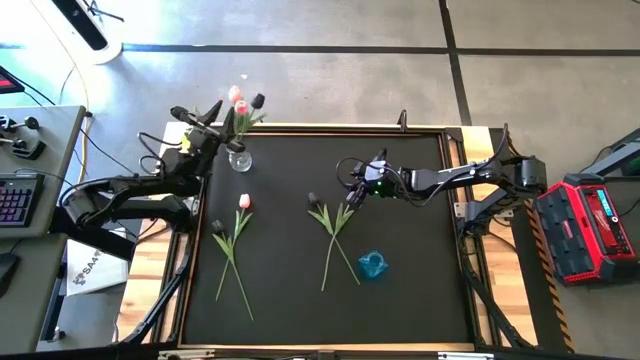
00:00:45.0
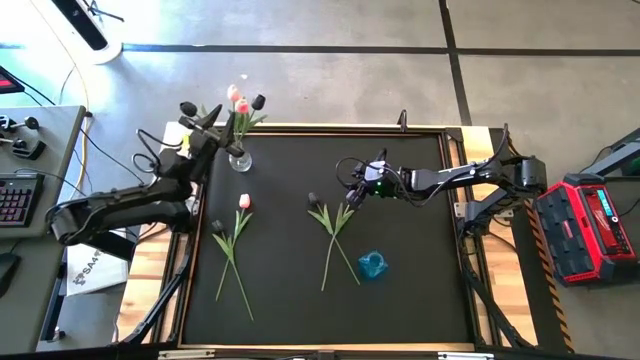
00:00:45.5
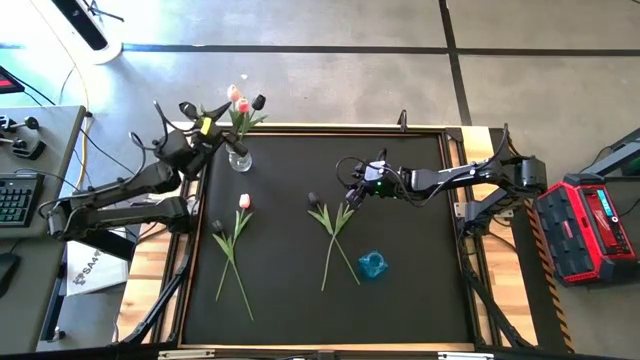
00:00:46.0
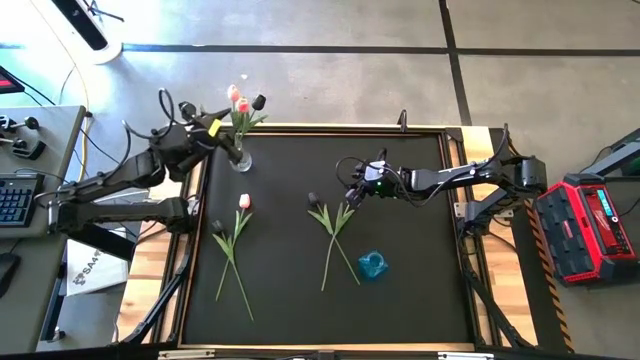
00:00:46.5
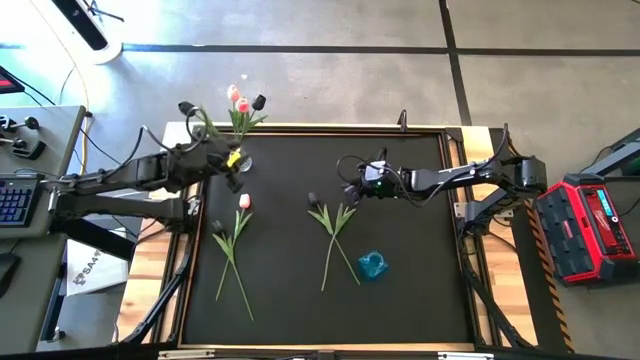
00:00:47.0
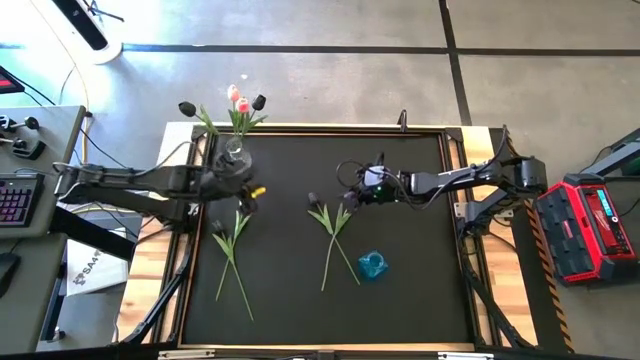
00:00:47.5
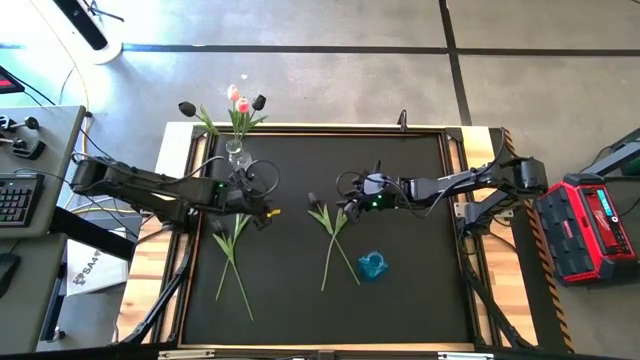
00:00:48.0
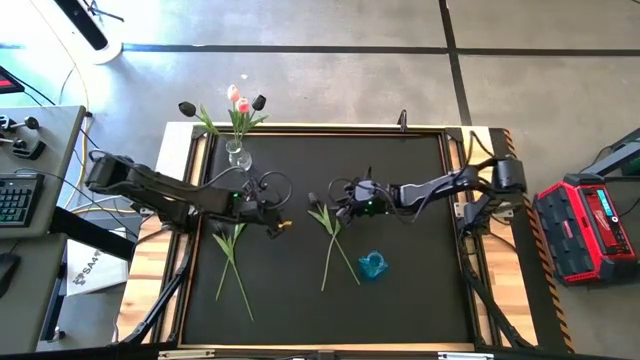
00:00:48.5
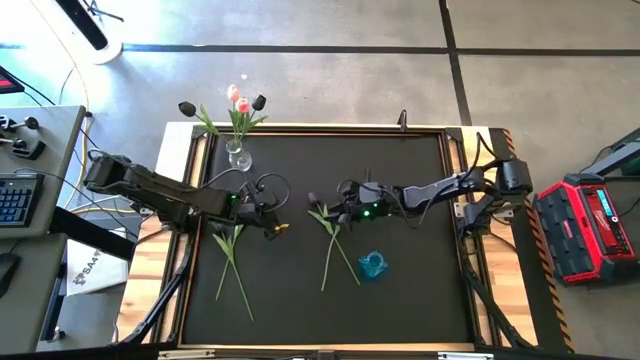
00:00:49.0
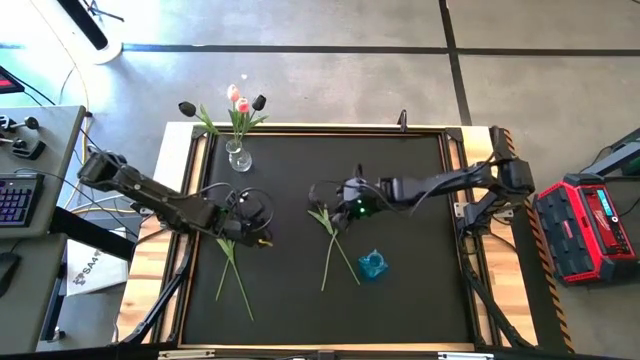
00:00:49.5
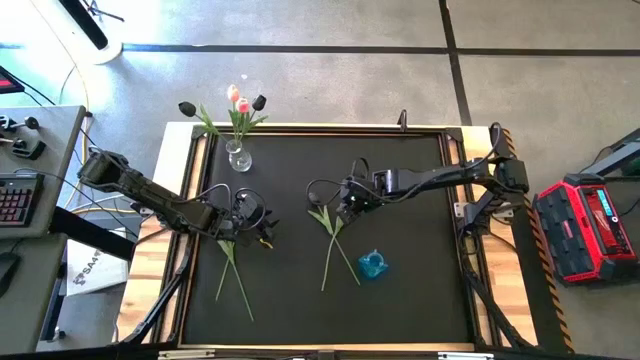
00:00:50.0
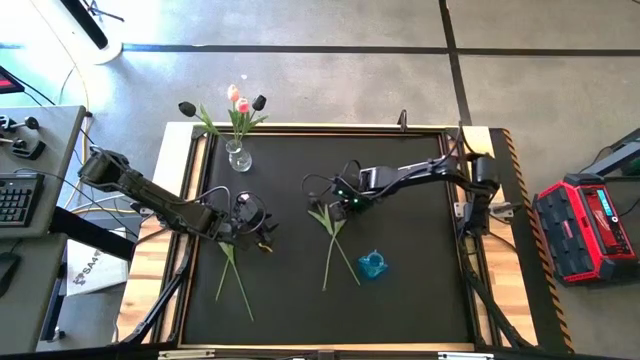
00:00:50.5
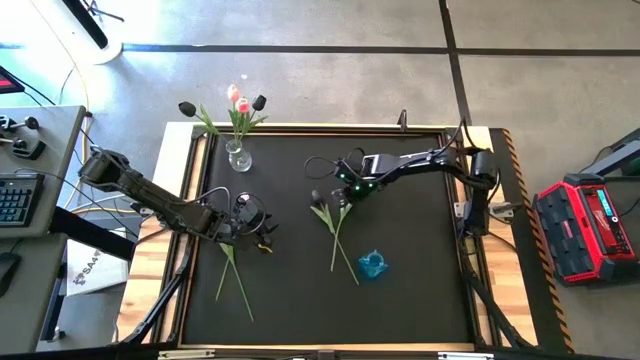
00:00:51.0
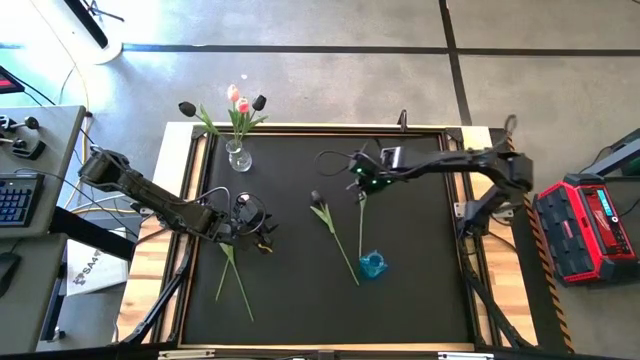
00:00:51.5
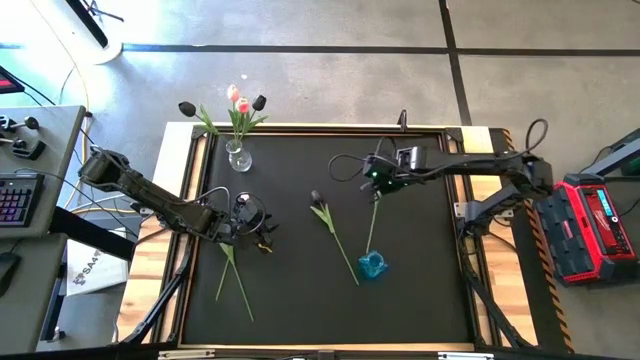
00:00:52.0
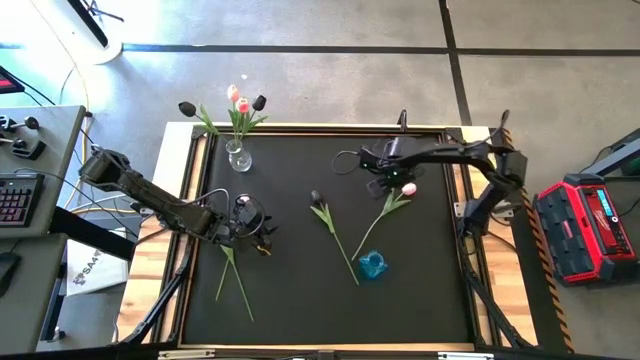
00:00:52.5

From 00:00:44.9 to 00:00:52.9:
Task: Sort flowers into vase by color
Put the right pink flower into the blue vase

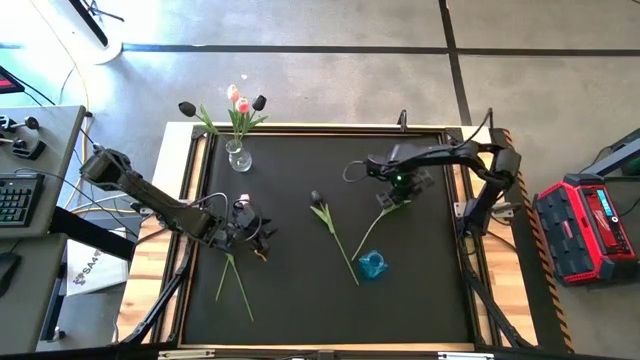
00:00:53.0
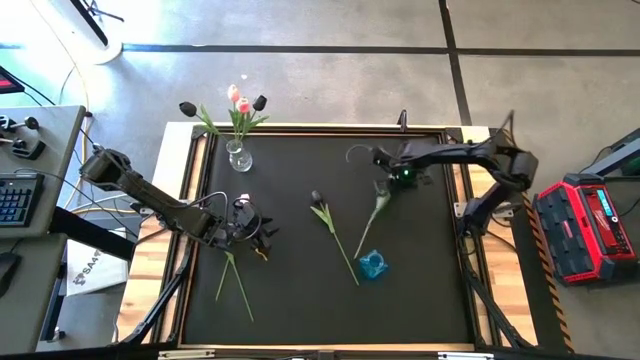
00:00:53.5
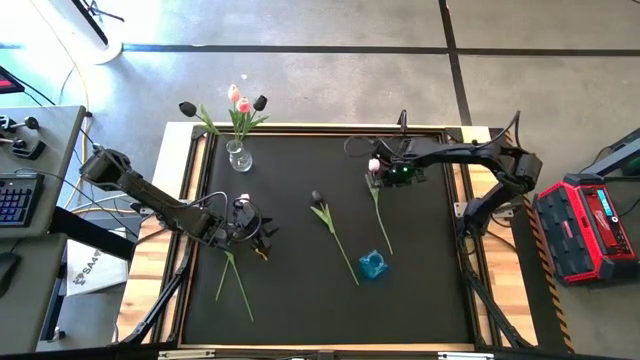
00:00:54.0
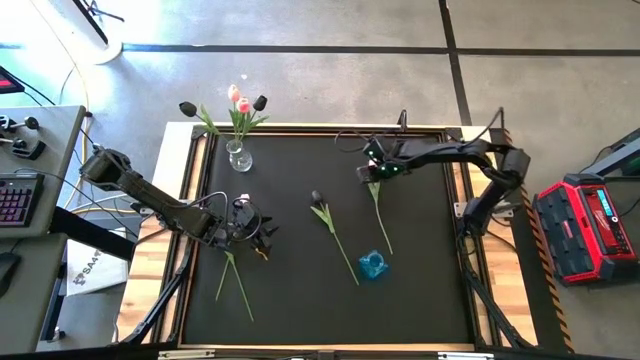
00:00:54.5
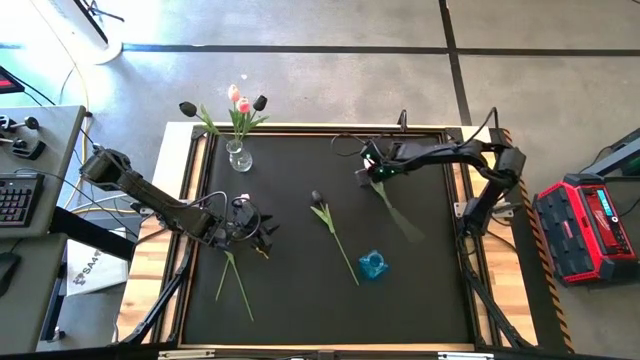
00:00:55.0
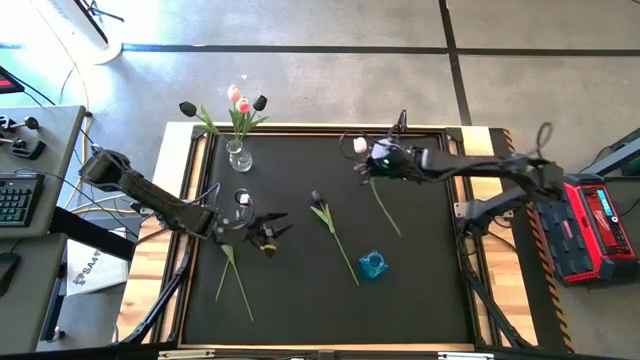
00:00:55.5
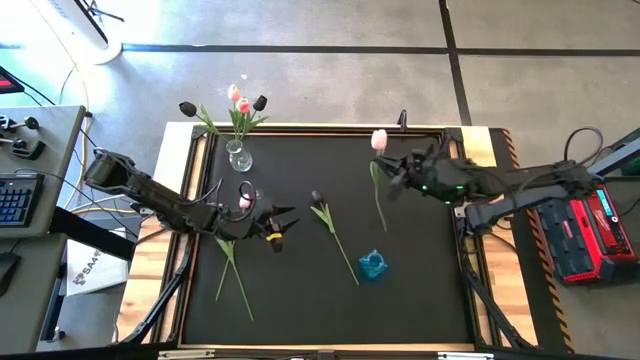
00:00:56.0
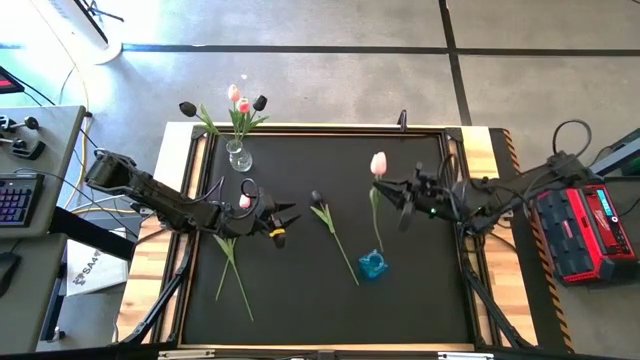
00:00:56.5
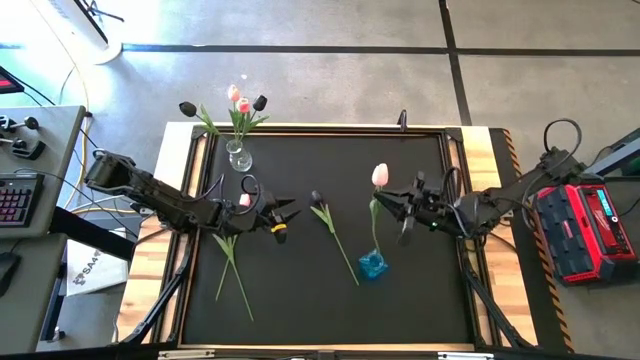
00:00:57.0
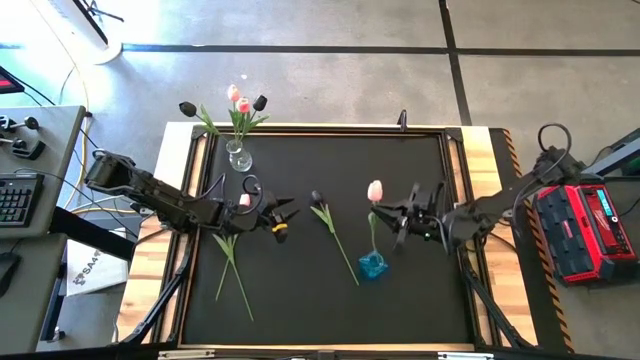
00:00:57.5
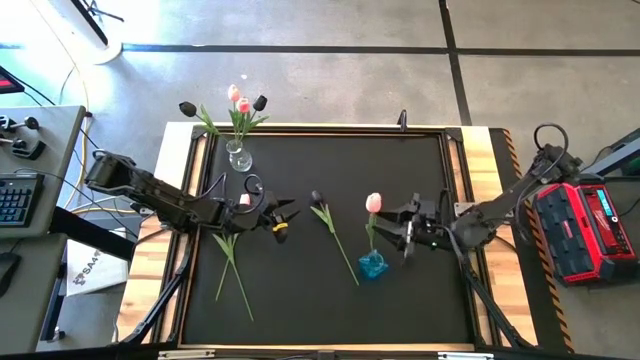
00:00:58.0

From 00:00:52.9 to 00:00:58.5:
Put the right pink flower into the blue vase

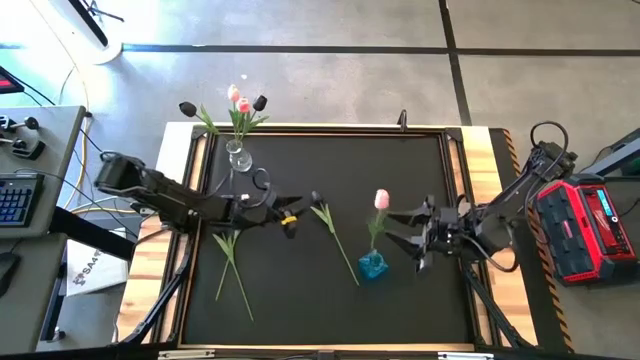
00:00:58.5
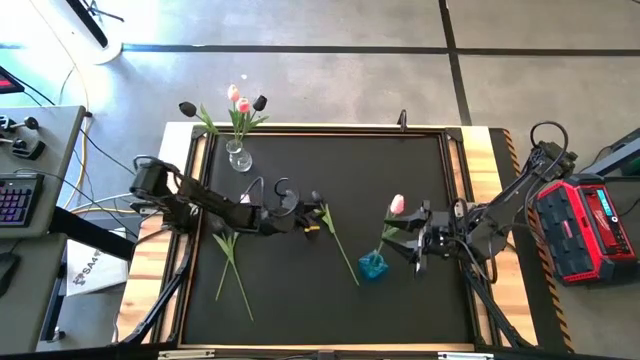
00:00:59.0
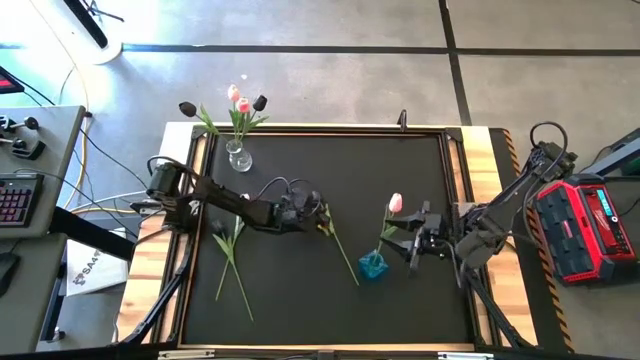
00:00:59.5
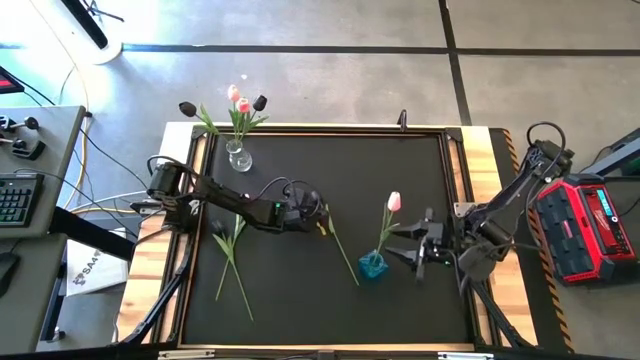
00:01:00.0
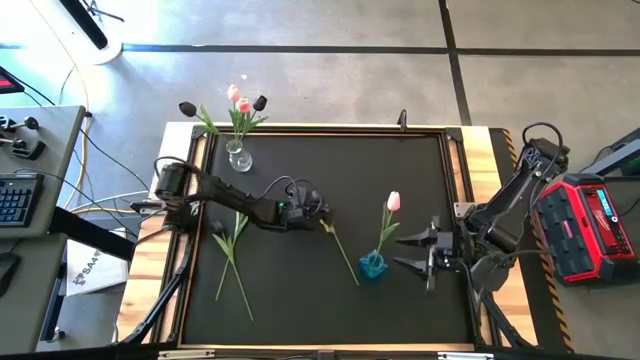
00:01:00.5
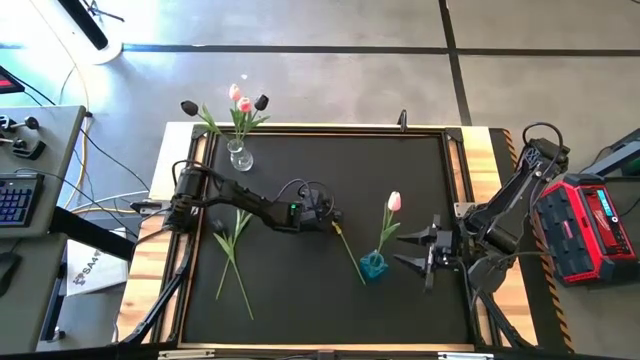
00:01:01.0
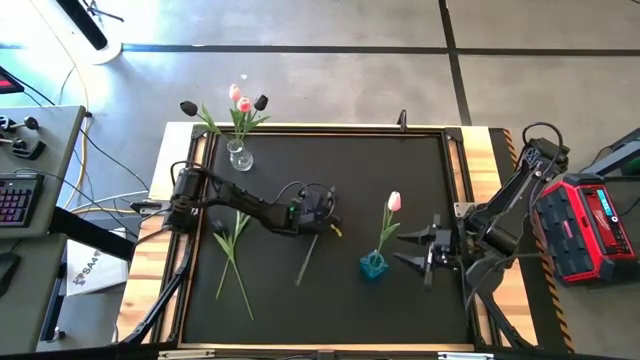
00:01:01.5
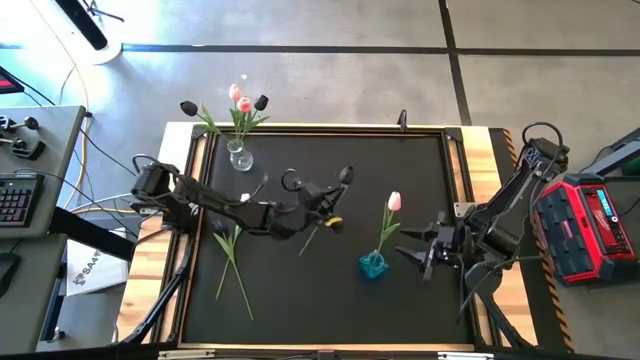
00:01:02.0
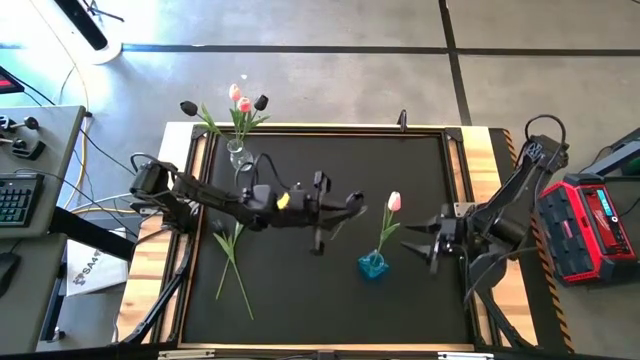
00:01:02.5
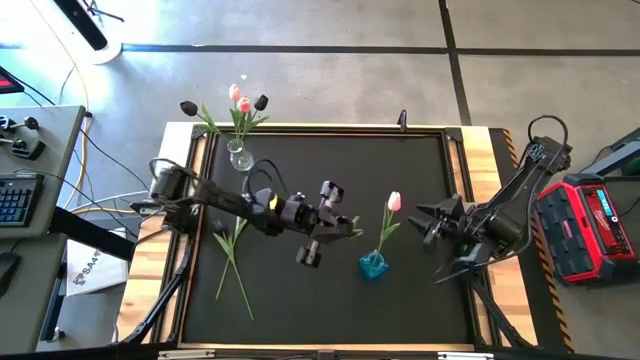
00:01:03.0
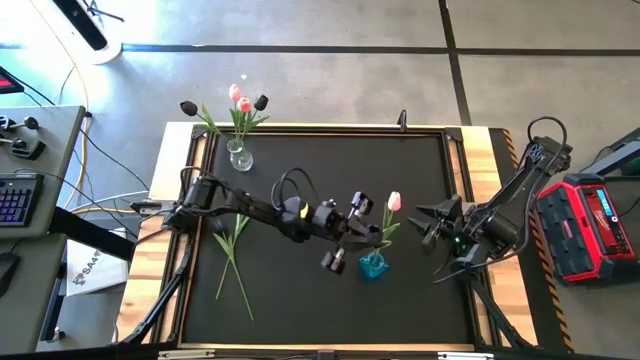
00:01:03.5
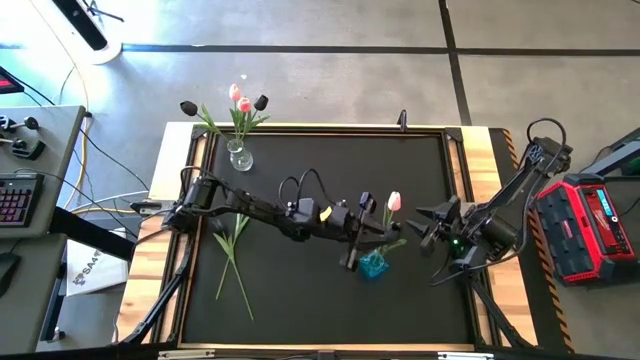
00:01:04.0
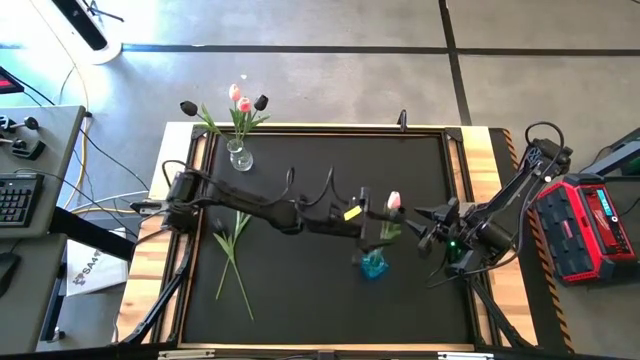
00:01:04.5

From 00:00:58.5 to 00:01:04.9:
Put the right black flower into the blue vase

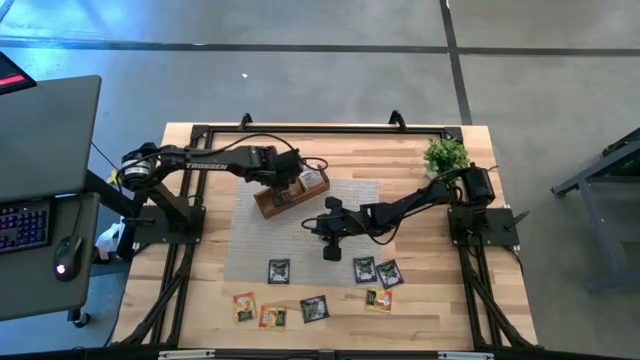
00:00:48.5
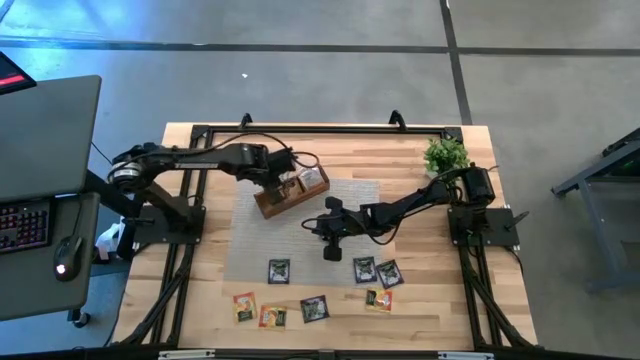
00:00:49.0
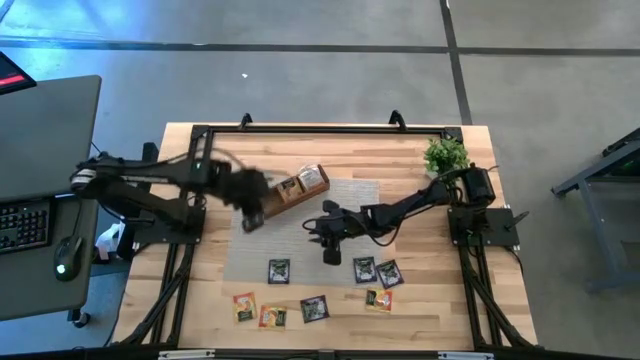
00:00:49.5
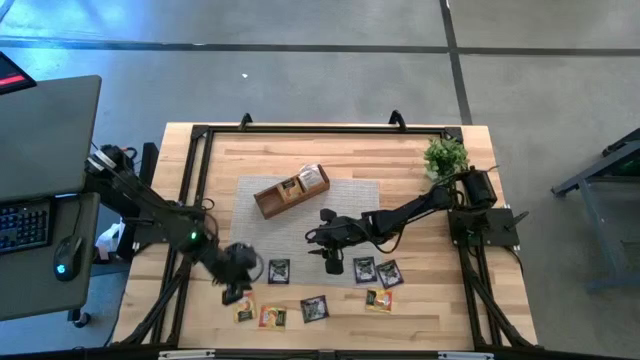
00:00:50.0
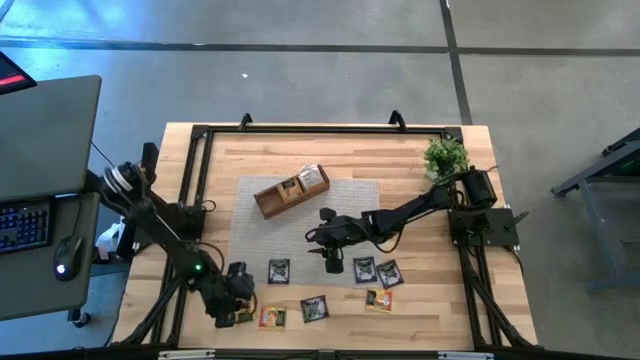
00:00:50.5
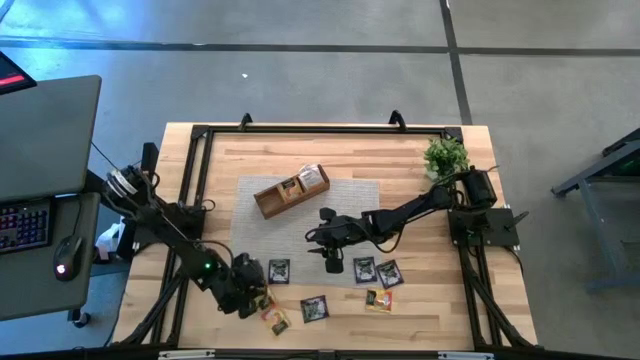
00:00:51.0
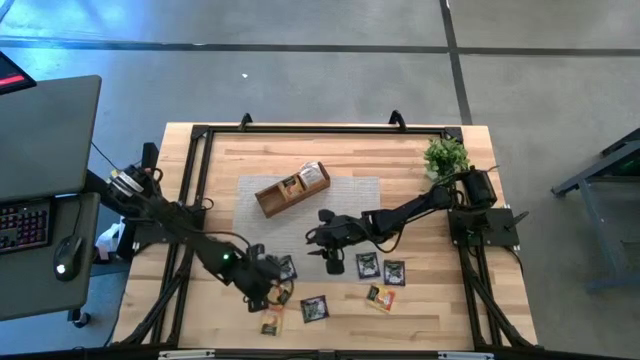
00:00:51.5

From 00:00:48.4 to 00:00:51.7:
Task: Pick & Place Tea
Put the yellow tea bag into the middle section of the wooden organizer
